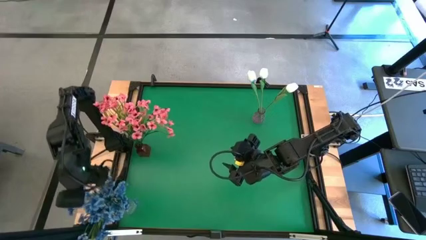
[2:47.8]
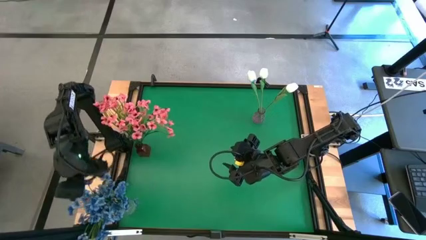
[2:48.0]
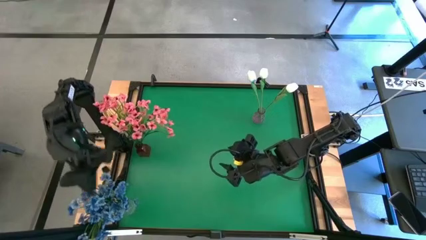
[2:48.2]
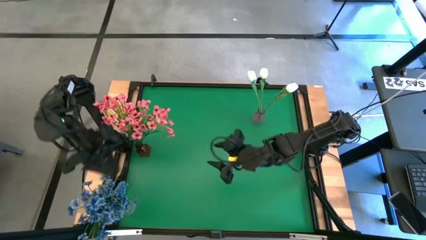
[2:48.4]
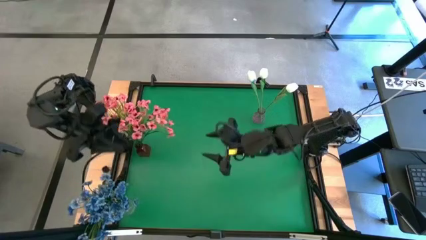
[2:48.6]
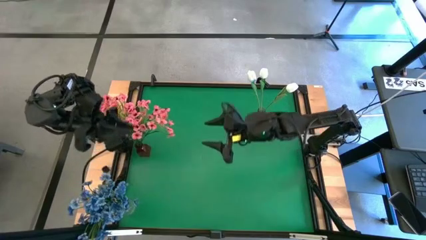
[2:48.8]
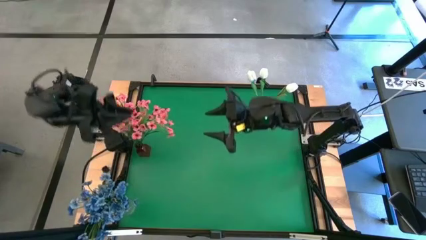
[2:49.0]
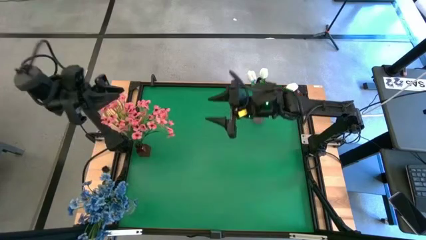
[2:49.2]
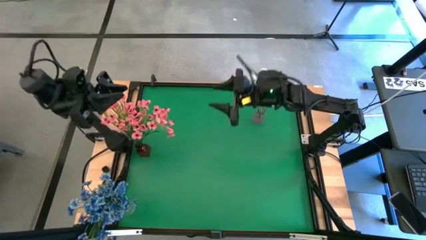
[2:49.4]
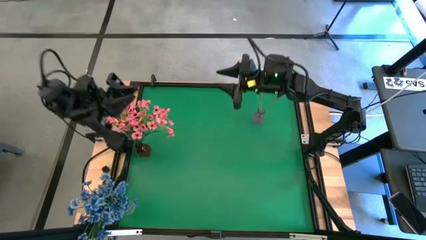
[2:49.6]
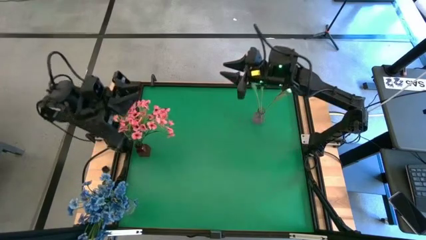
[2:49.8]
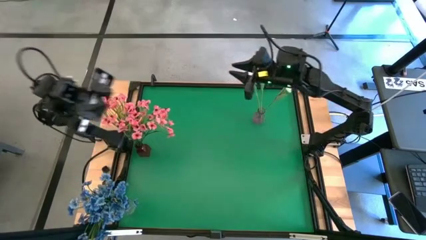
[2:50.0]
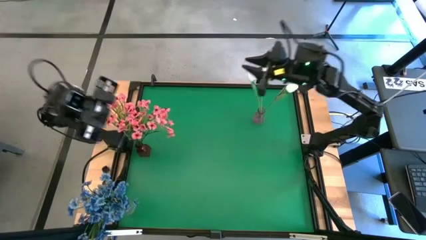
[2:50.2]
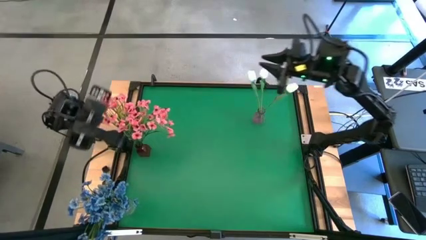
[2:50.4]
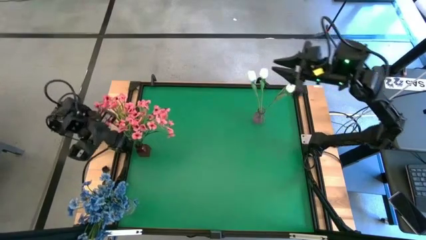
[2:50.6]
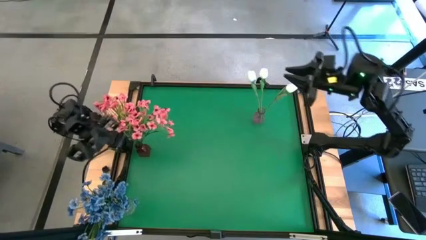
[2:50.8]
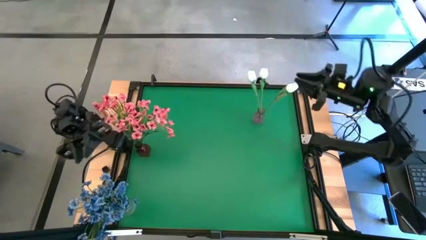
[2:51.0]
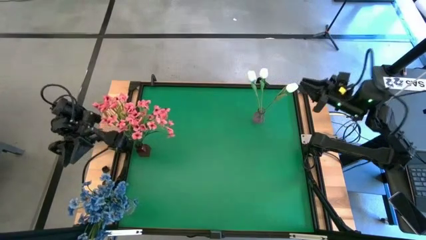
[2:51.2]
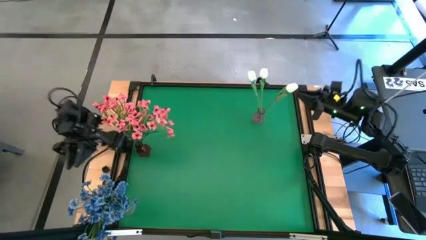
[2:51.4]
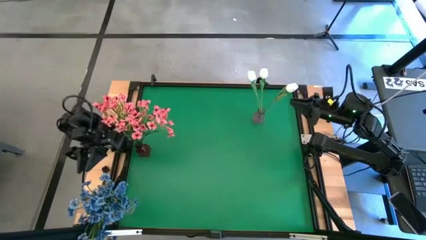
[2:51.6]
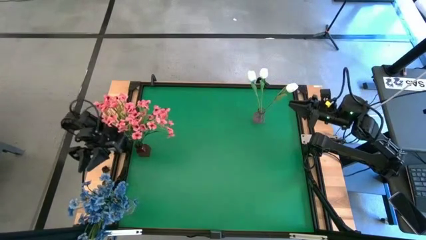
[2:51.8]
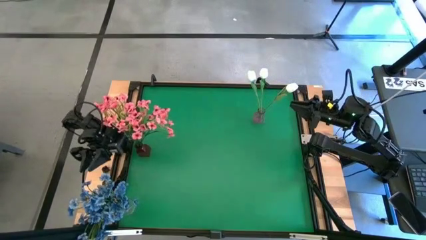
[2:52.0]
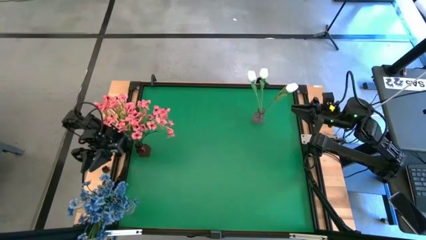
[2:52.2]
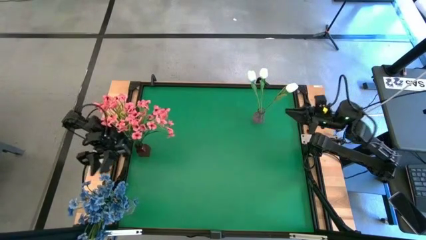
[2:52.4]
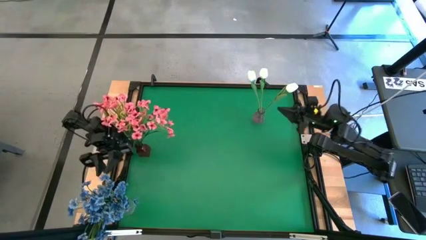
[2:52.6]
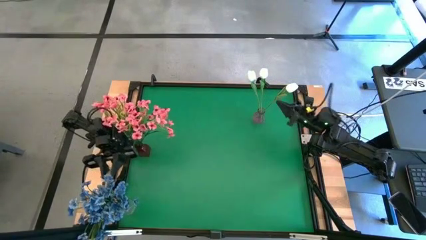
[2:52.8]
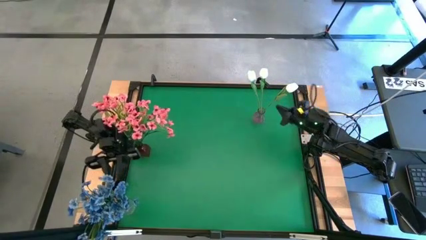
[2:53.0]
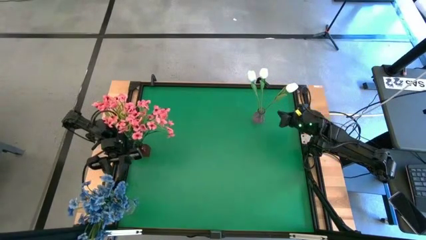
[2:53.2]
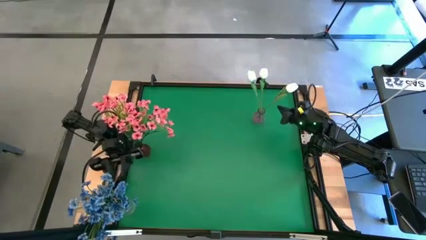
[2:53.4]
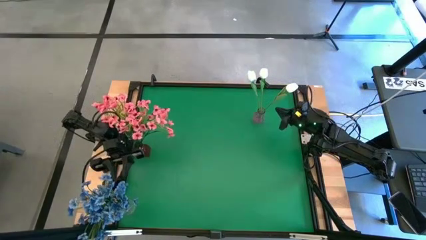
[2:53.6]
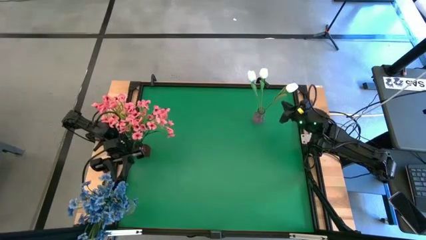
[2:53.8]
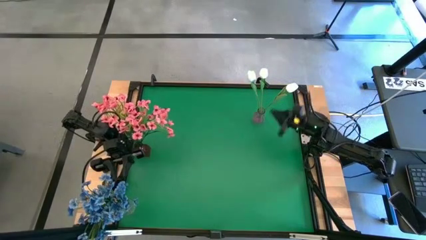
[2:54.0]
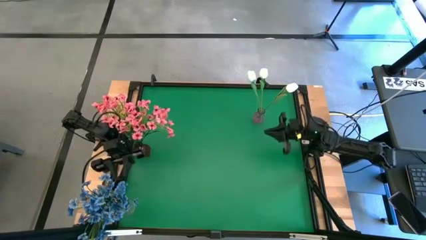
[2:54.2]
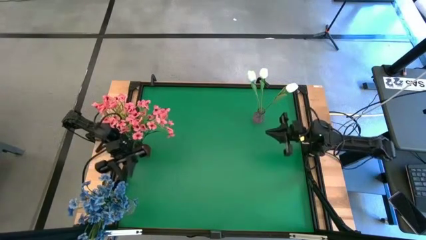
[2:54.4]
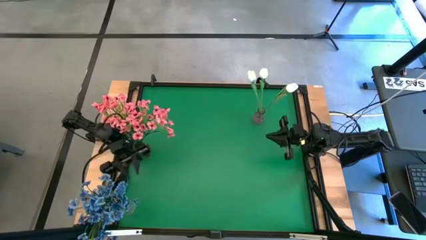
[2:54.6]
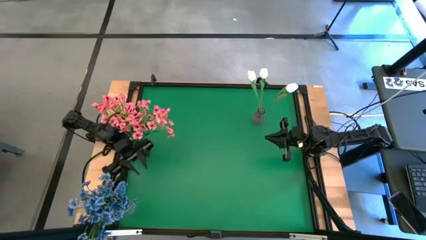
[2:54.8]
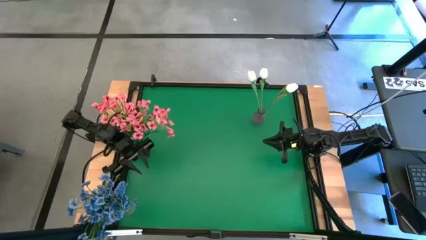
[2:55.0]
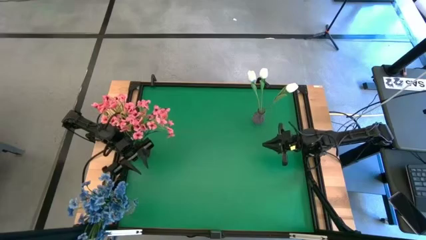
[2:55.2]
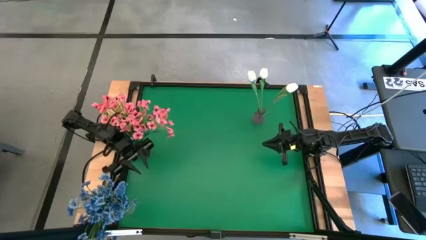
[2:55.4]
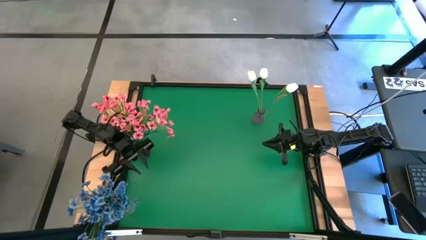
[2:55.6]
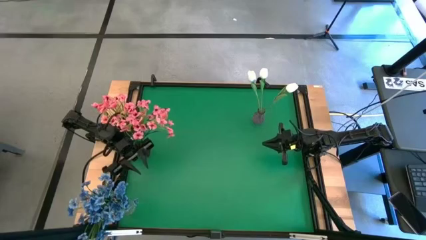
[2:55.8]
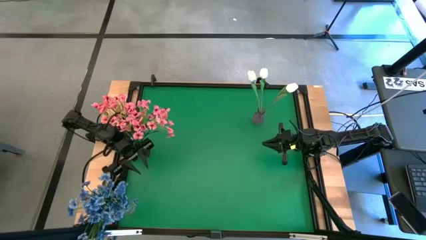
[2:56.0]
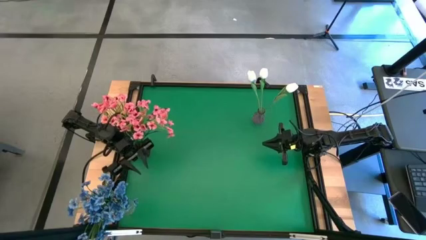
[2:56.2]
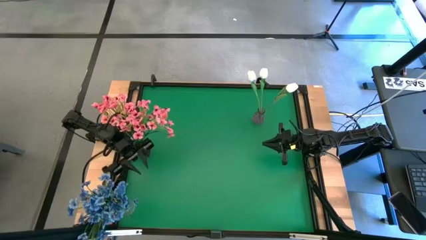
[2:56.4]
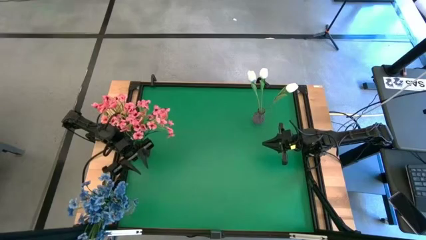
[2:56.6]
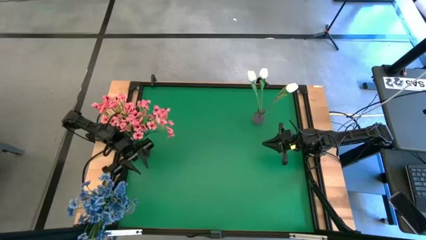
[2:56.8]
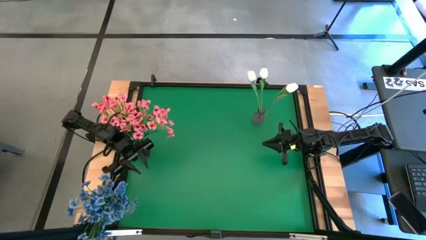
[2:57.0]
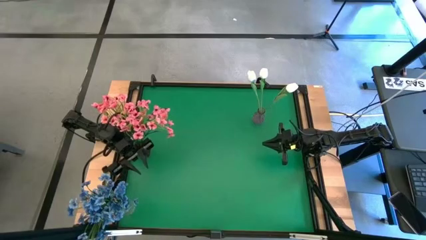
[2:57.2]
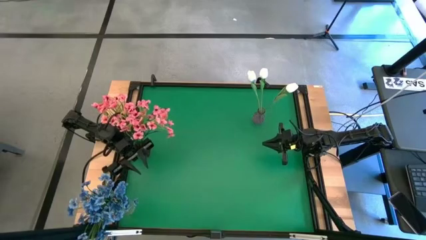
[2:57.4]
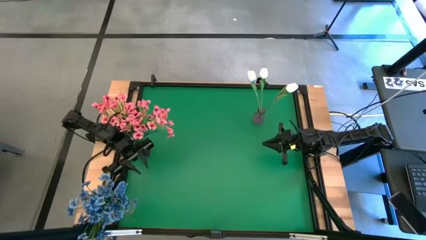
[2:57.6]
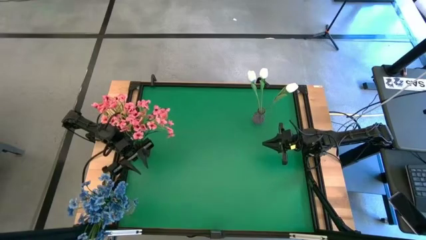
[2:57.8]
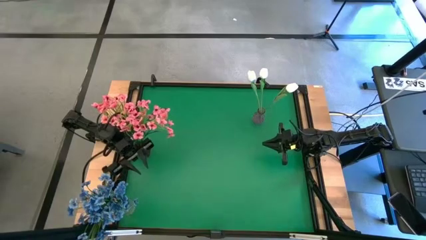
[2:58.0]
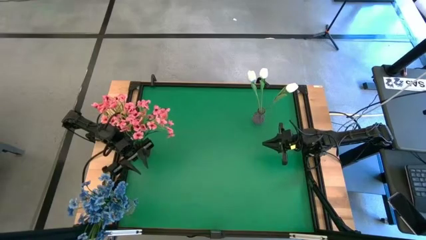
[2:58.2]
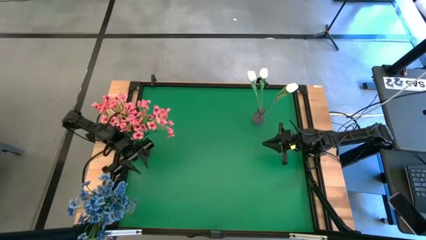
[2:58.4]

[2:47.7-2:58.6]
Task: Sort flowers into vase by color
Return to Home Position

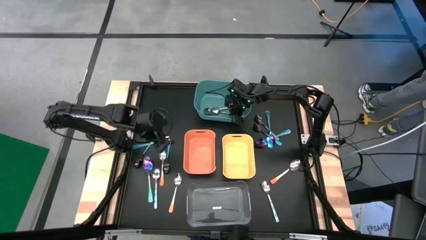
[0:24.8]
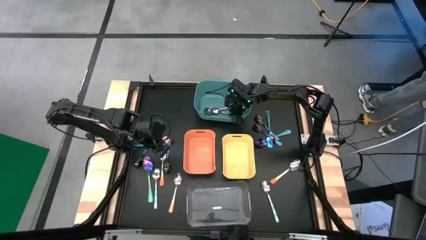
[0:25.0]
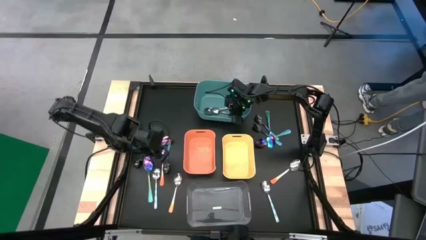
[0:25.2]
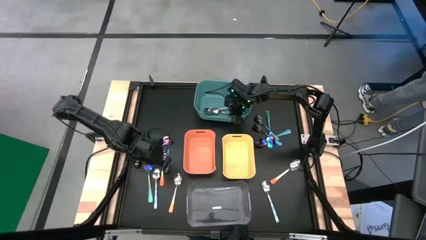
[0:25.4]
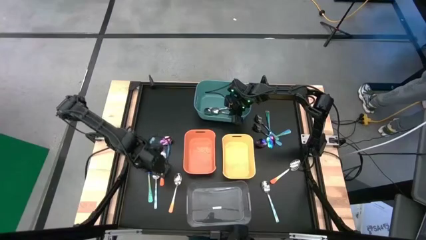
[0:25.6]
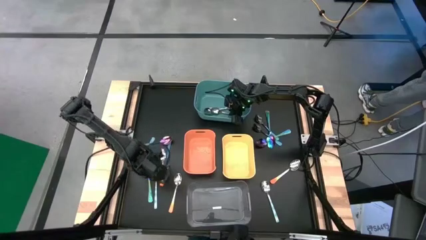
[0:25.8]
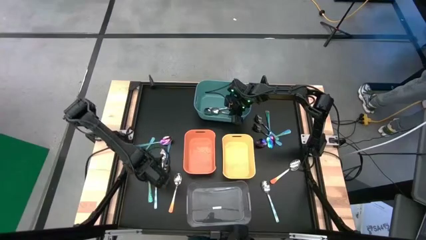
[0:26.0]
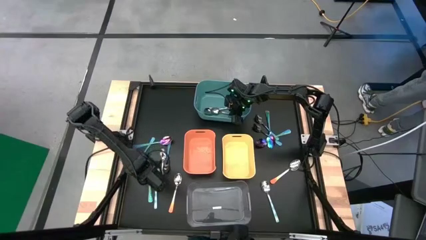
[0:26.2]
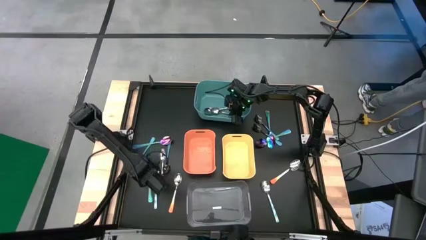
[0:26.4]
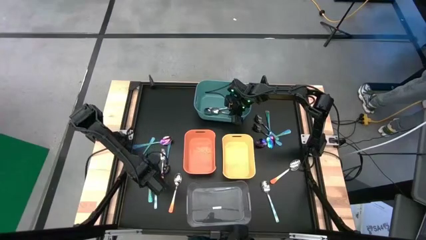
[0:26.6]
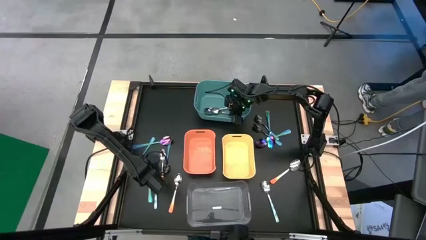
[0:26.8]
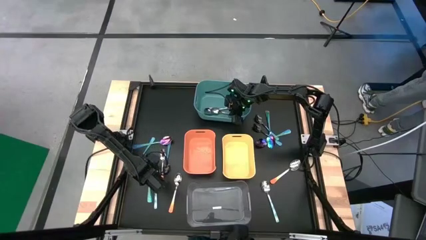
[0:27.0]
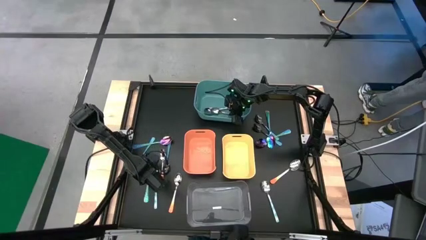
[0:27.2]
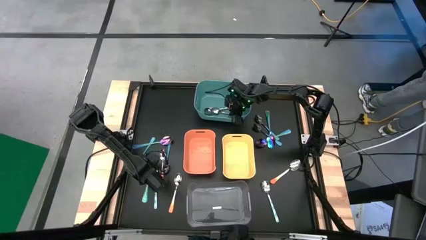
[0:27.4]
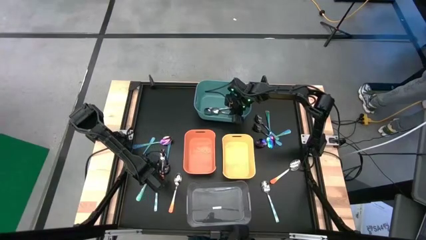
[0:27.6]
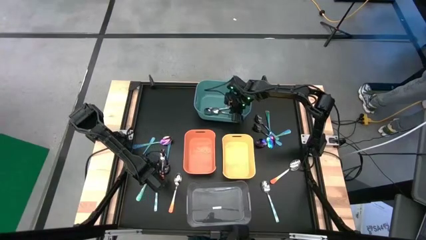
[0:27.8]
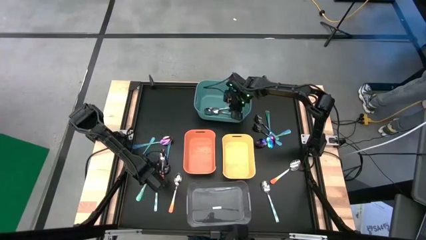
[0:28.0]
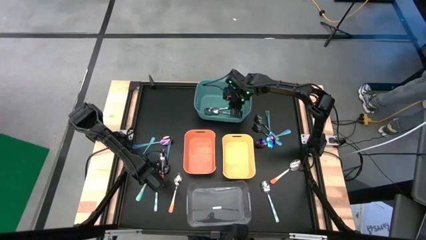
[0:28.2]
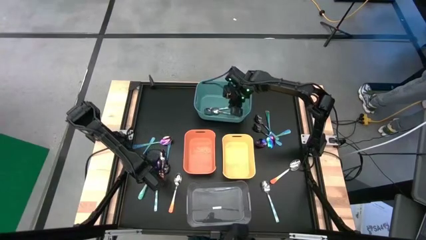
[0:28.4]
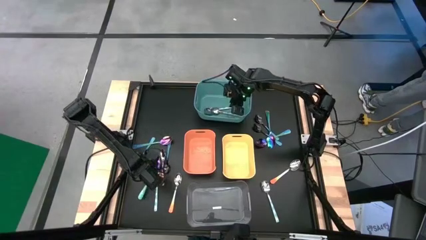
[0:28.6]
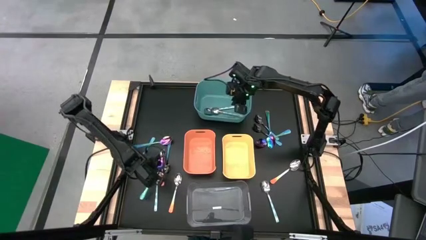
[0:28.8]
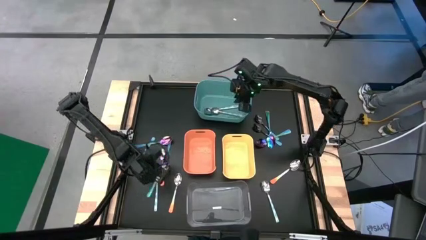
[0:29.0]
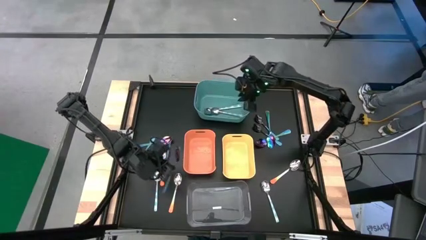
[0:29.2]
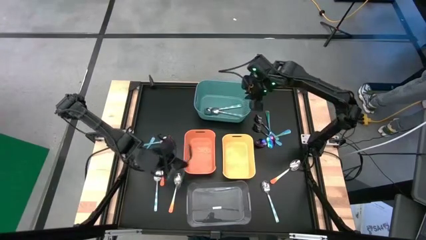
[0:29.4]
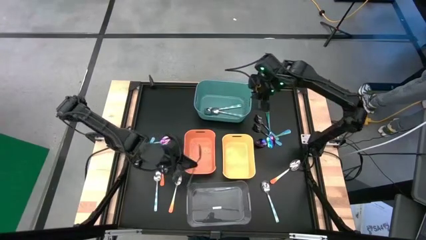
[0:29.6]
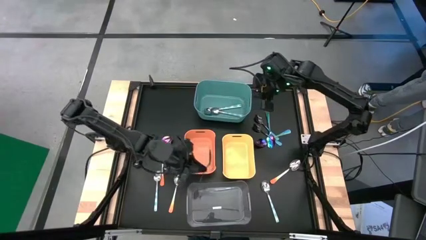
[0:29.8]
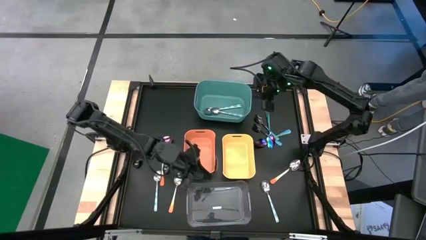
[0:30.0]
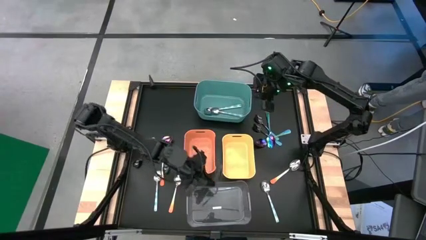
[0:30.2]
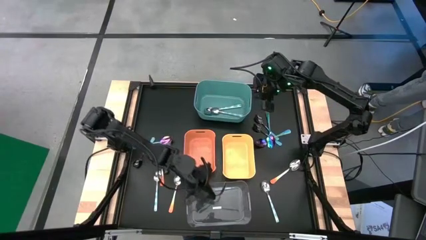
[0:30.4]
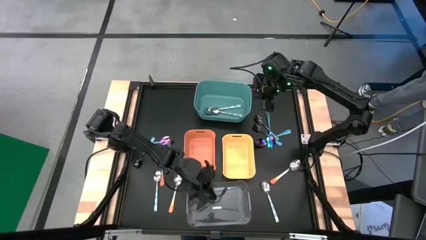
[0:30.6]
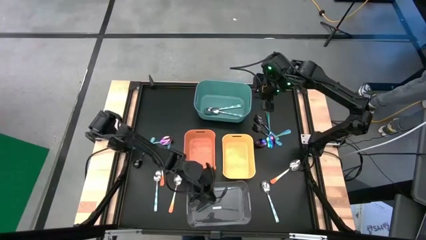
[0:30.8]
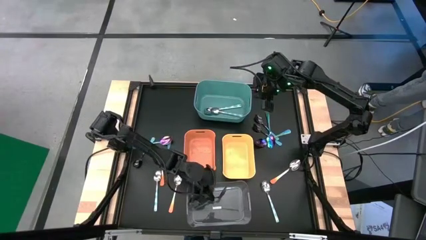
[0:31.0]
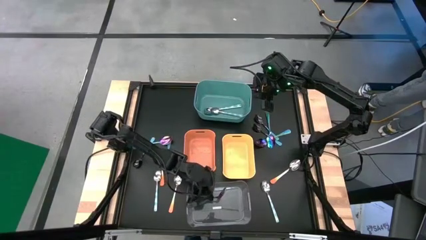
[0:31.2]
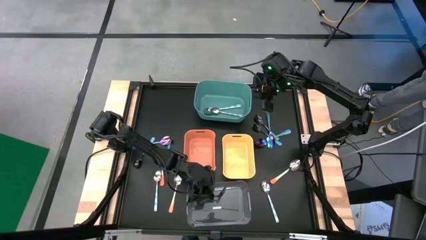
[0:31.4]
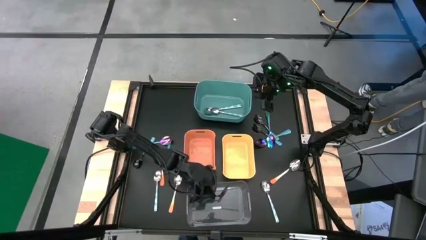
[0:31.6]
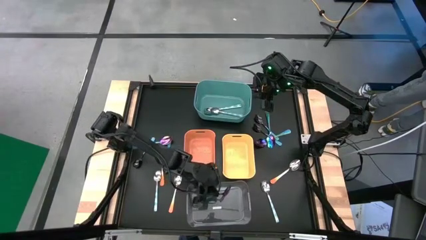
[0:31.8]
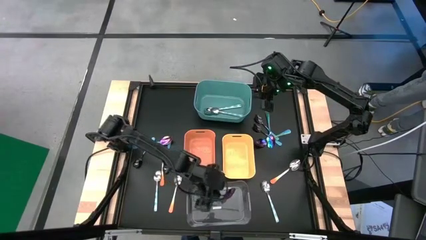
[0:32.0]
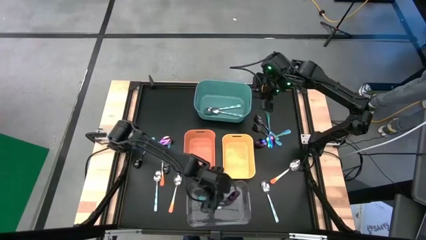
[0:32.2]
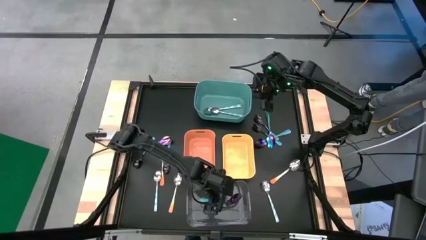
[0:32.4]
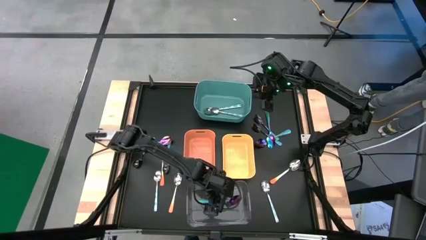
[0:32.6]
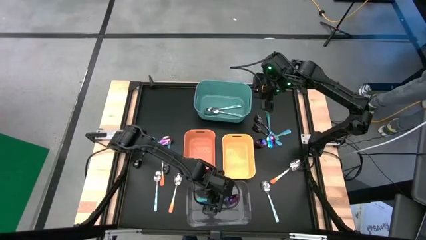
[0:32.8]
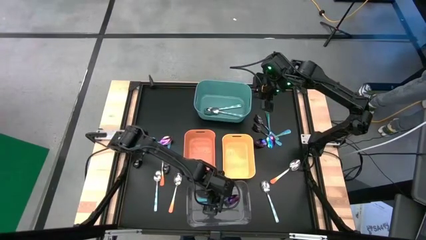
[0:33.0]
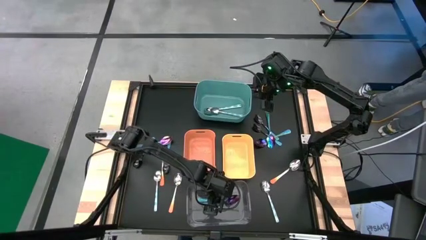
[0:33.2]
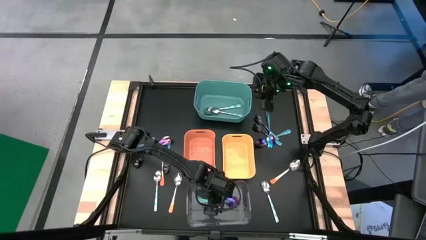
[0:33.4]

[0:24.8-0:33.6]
Task: Sort silverware by color (type)
Put the blue spoon into the transparent bin
